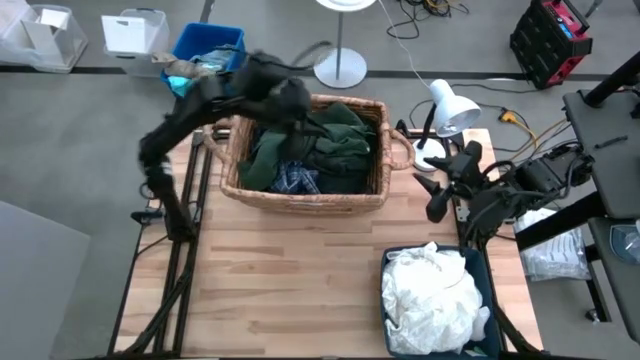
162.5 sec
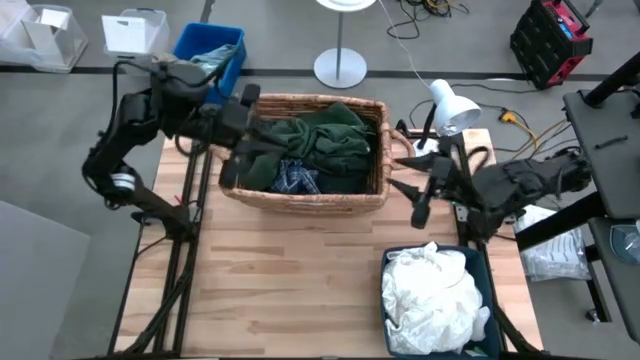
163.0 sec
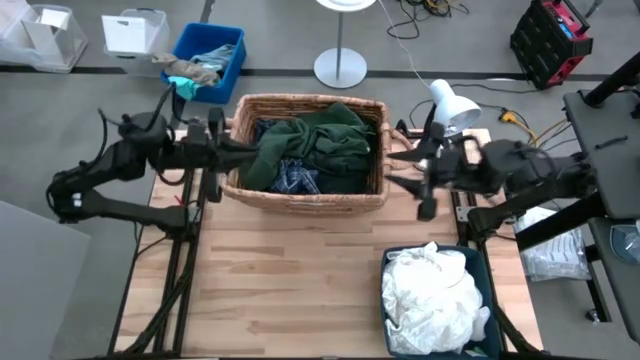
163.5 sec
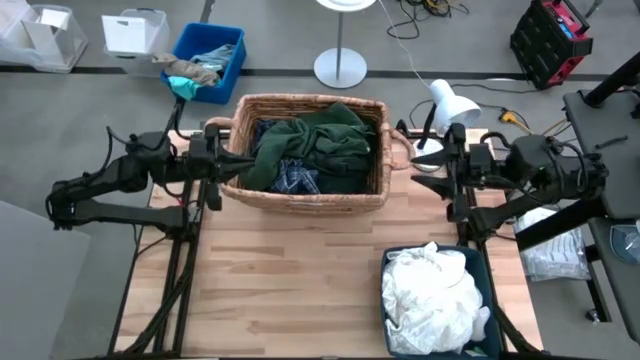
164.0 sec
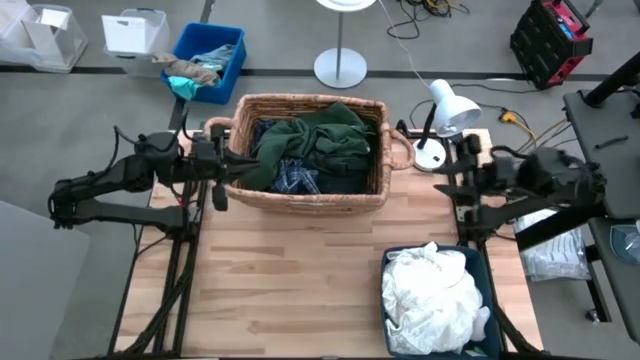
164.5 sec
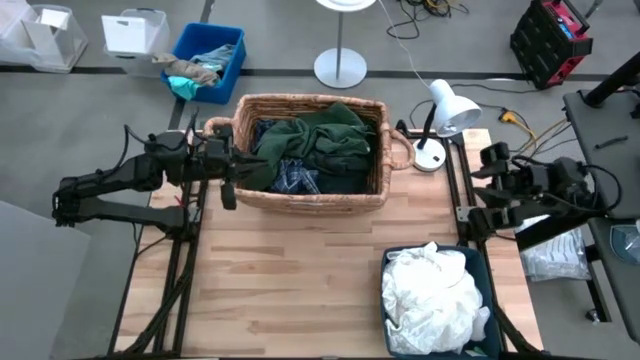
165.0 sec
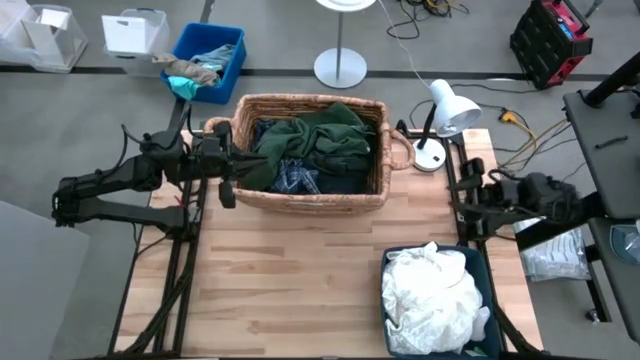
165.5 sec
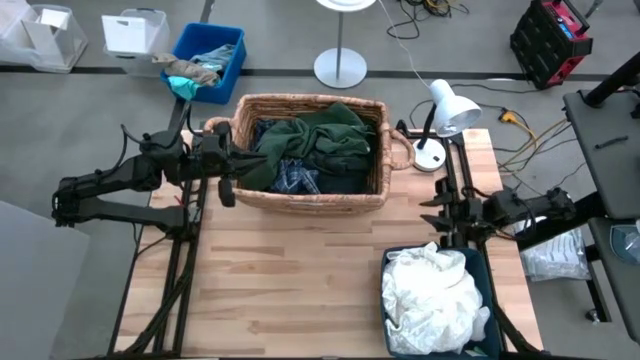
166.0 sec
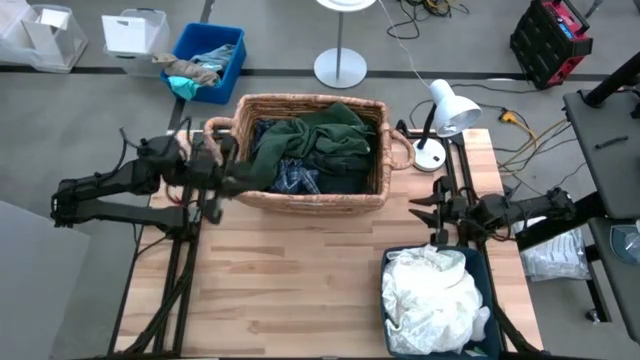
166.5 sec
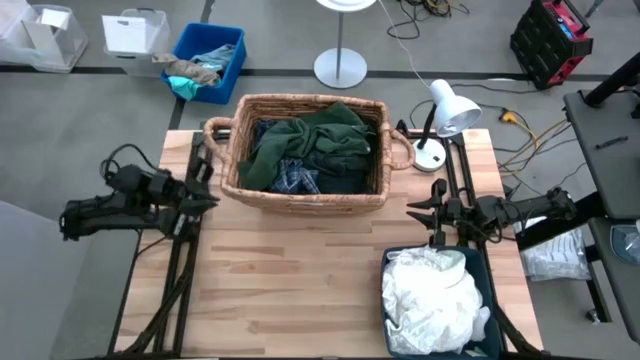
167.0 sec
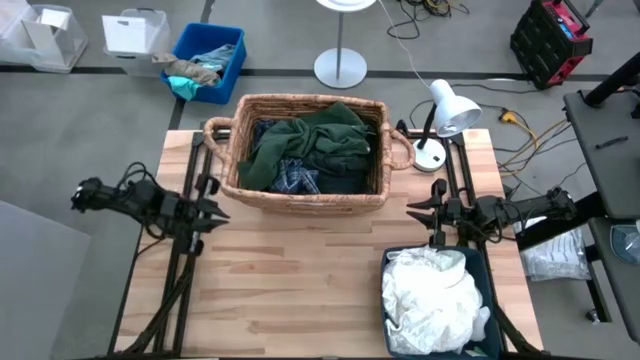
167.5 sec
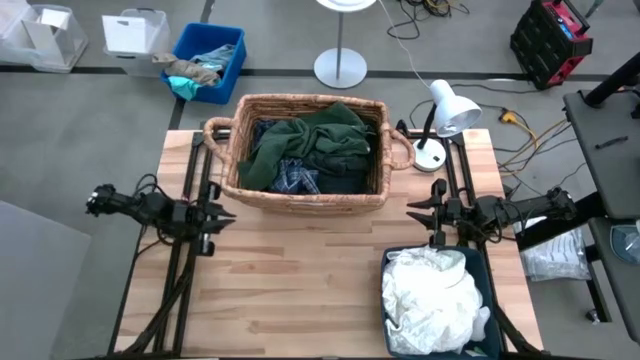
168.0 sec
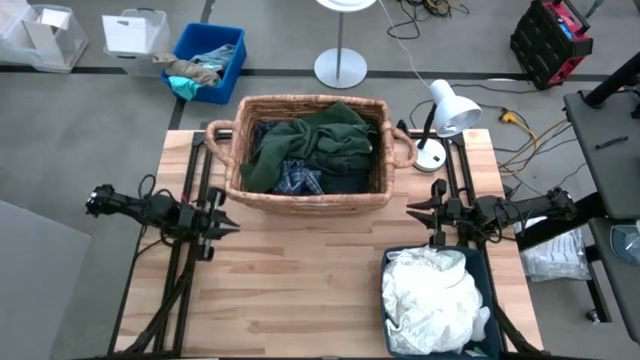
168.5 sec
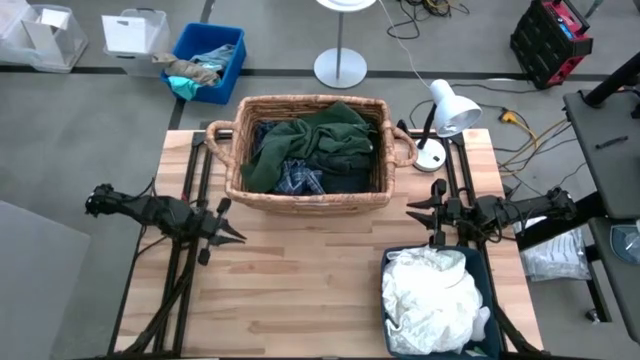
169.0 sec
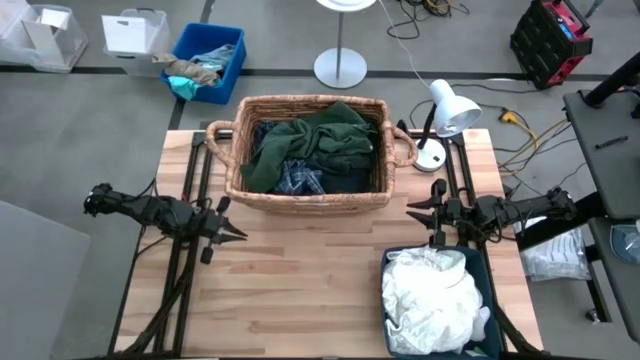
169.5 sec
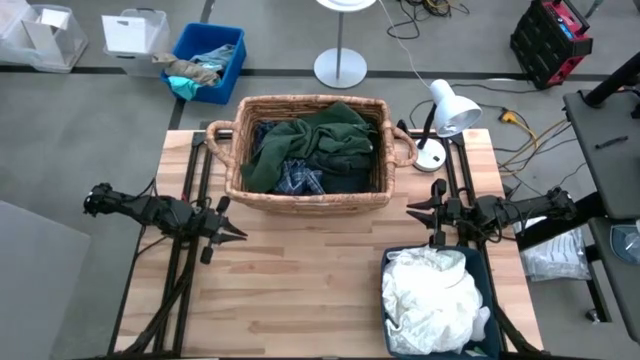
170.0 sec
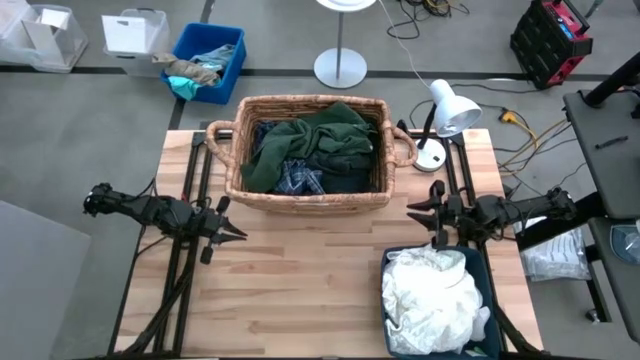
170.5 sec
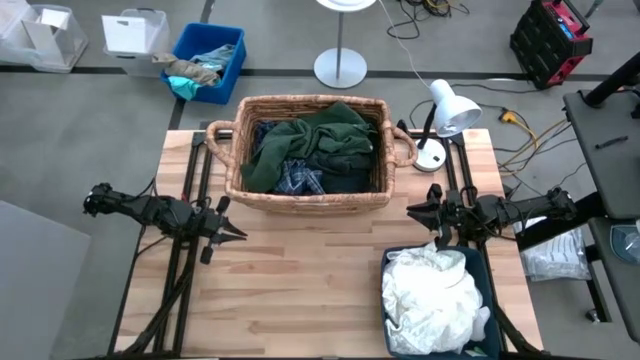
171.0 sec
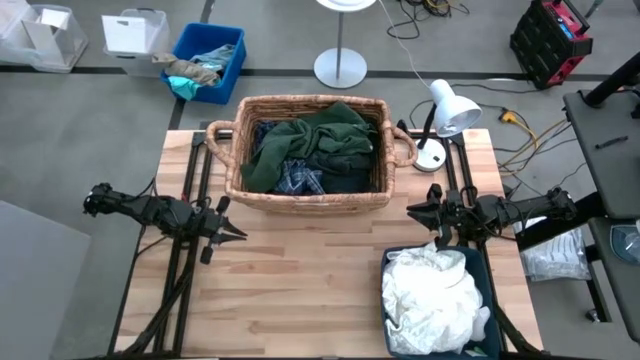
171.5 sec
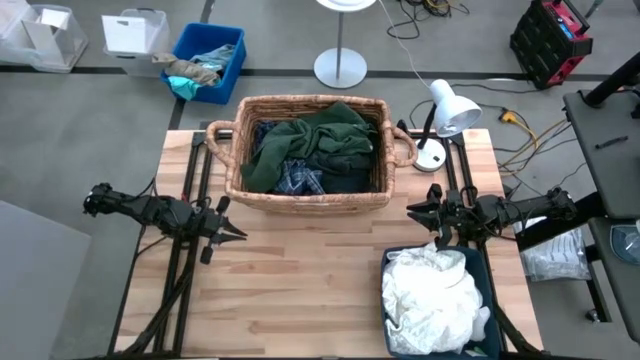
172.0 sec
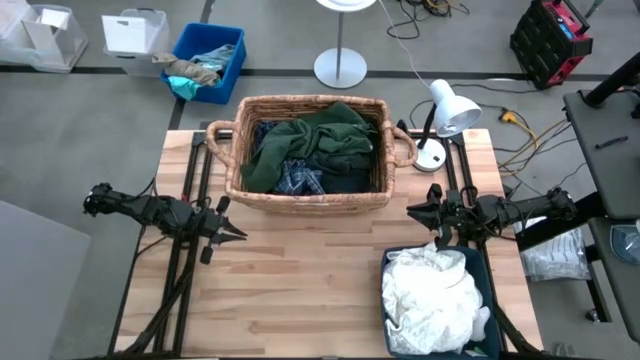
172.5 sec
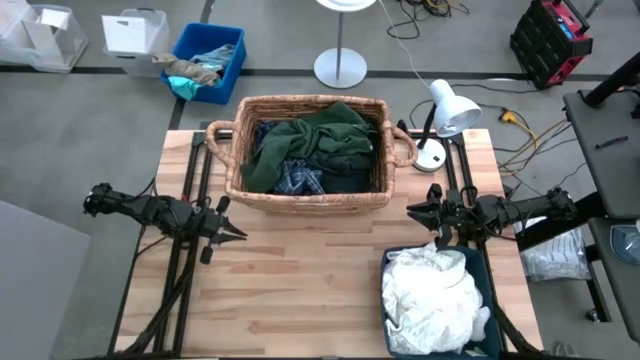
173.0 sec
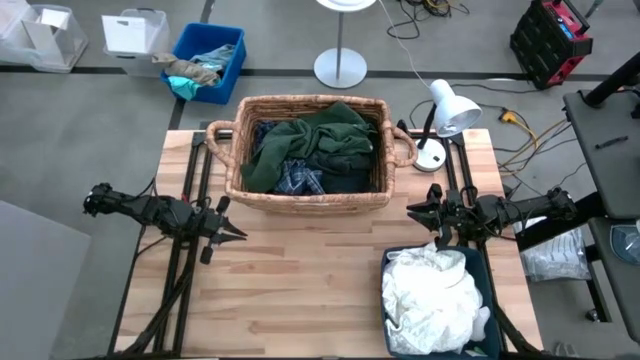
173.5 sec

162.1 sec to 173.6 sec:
Task: Sort clothes
Return to Home Position

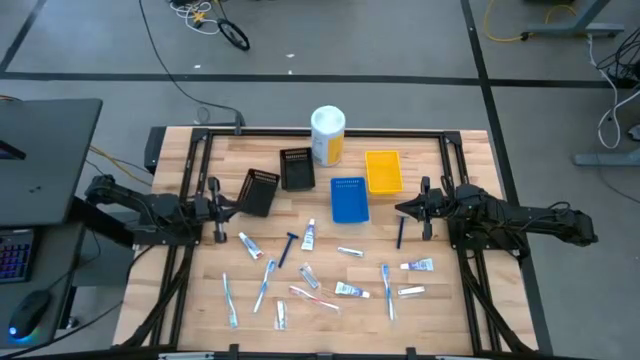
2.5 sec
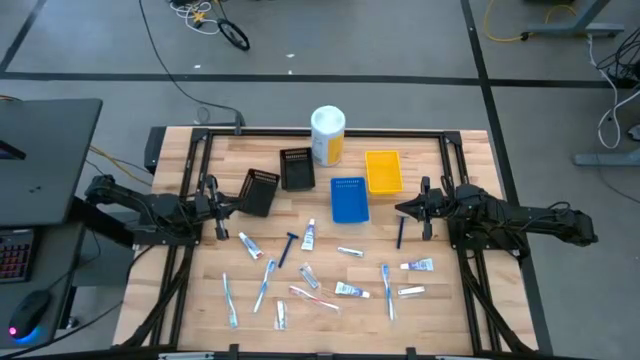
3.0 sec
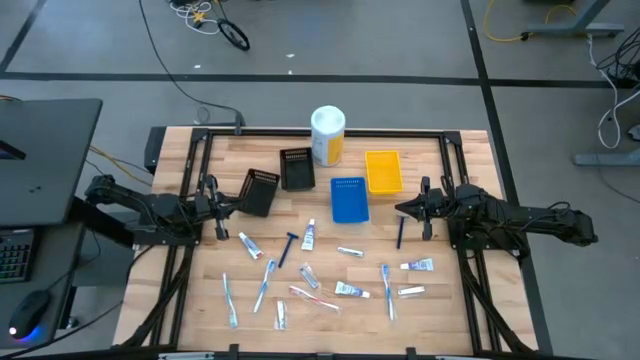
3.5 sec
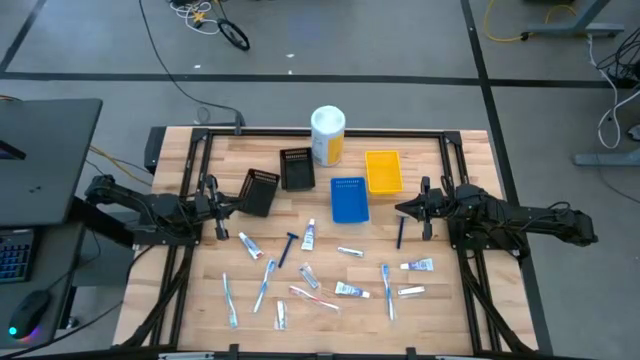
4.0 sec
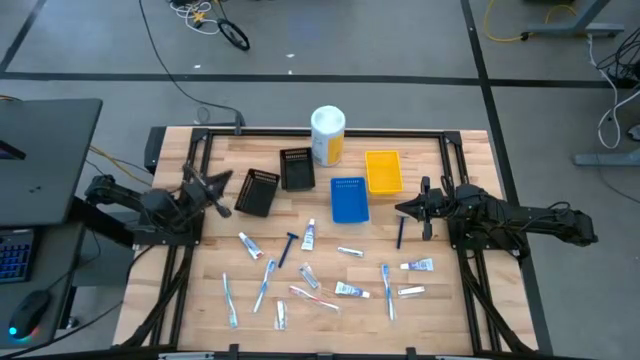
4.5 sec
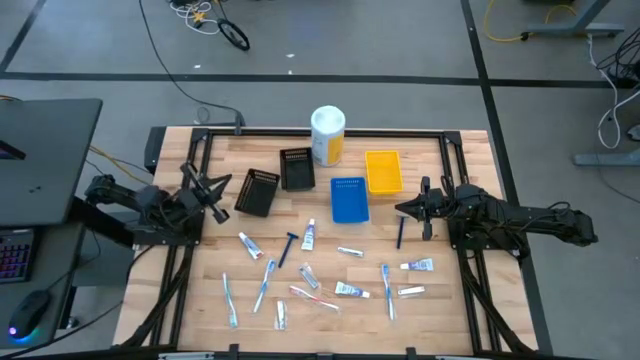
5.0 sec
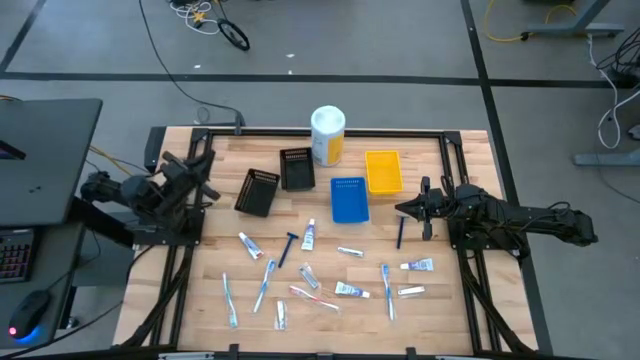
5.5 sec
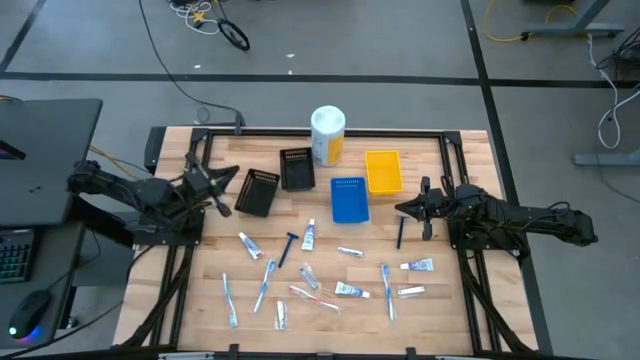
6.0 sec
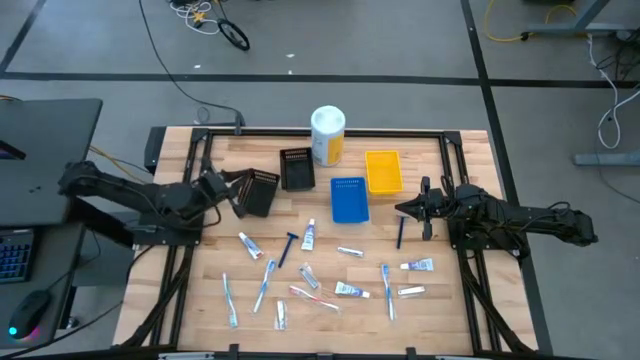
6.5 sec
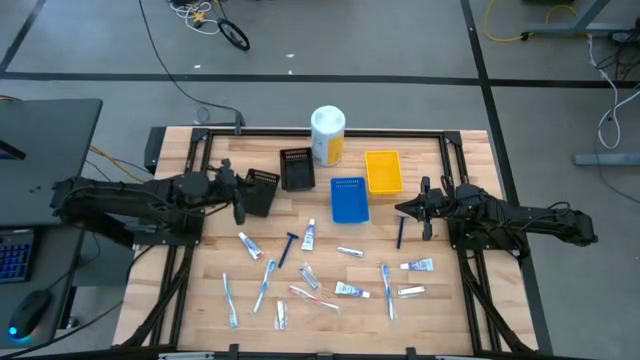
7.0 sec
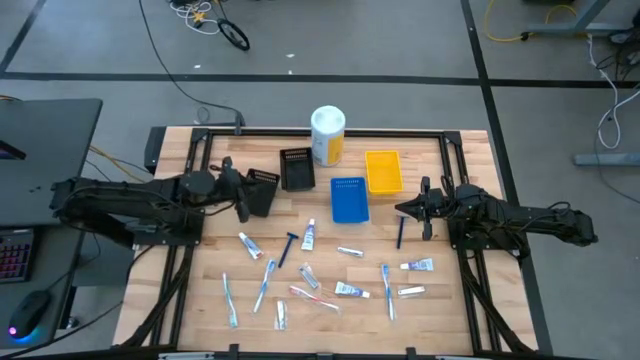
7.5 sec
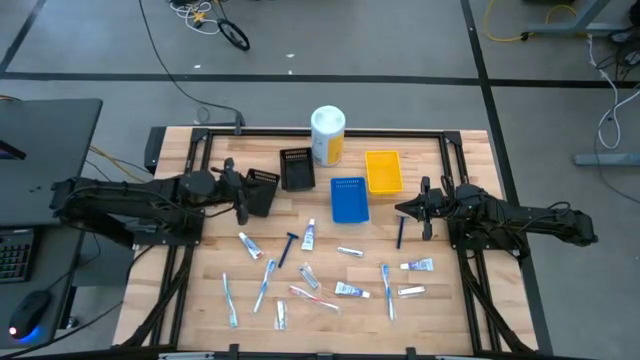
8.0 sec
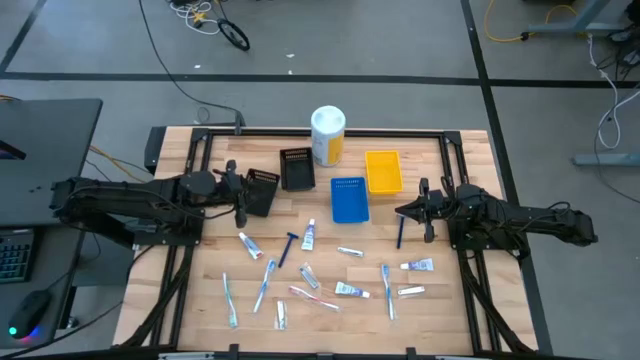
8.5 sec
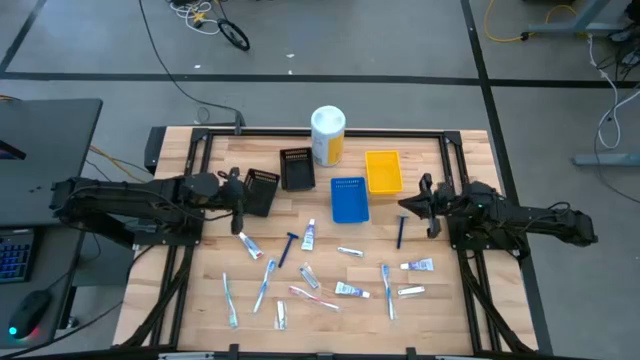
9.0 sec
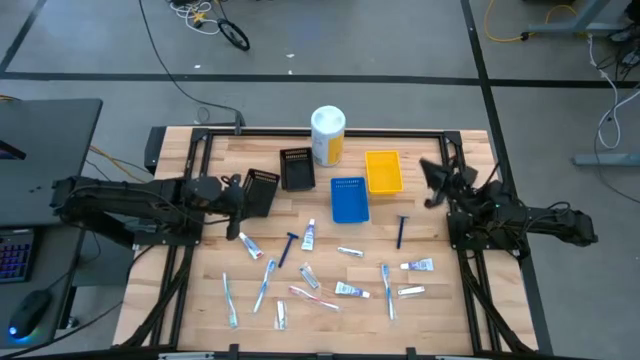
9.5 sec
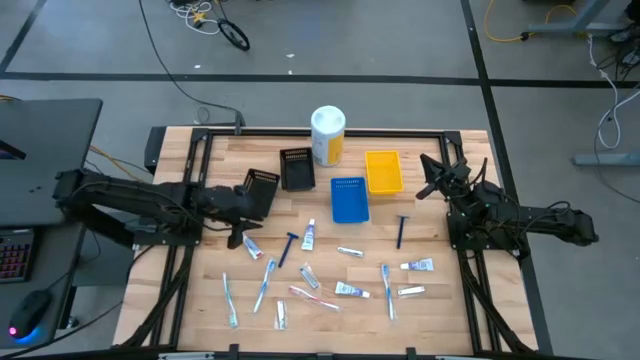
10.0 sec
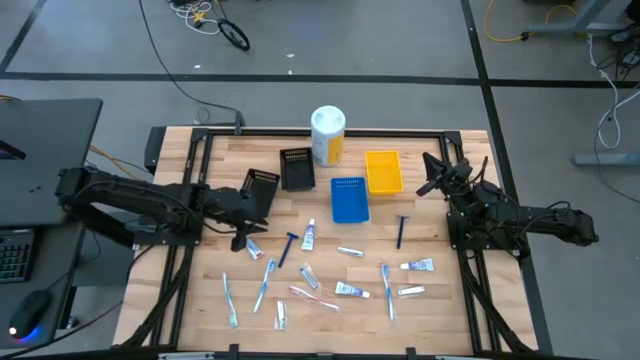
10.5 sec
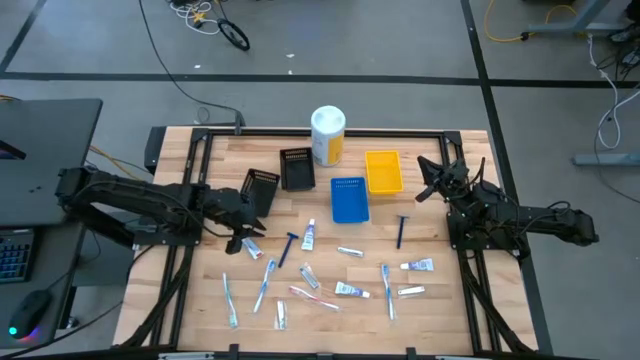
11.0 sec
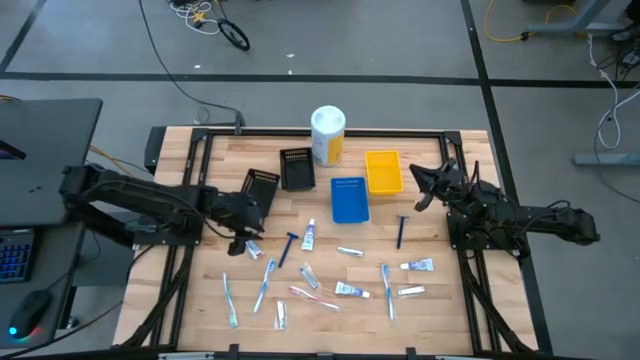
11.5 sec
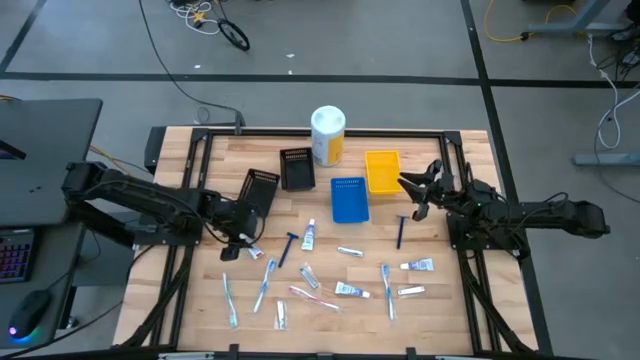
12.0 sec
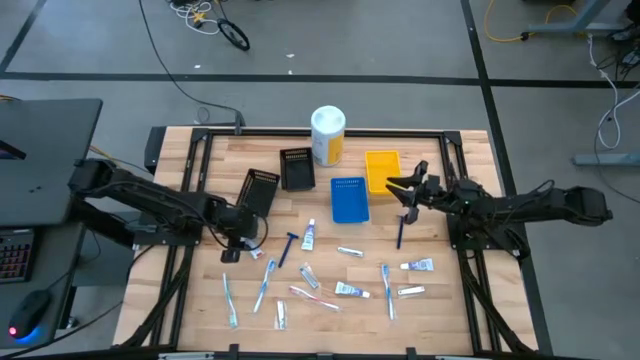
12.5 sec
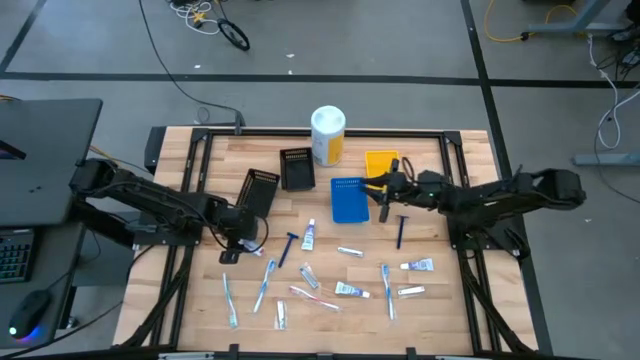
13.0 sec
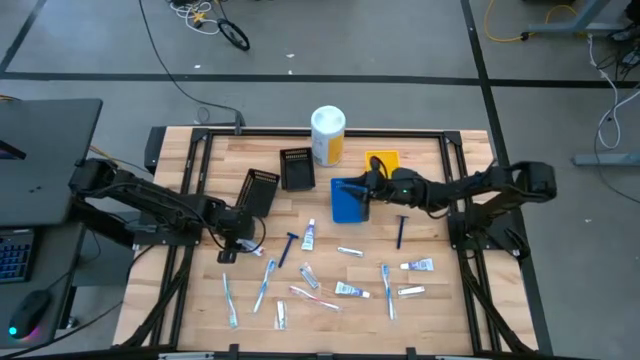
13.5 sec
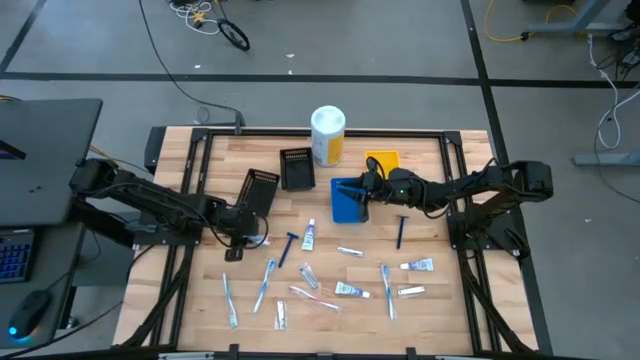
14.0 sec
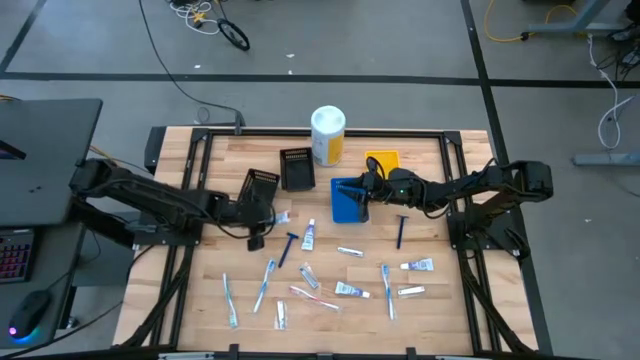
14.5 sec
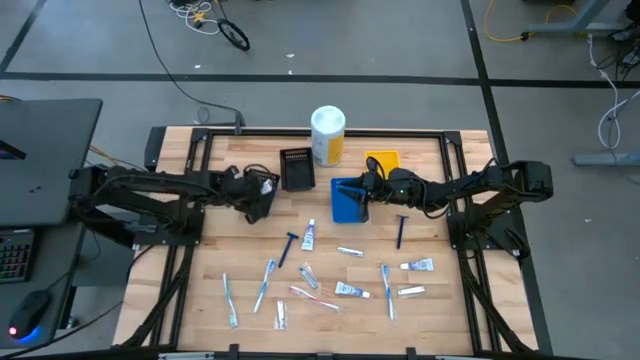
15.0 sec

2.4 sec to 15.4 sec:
Task: Pick & Place Travel size toiletries
Put the white toothpaste into the left black bin
